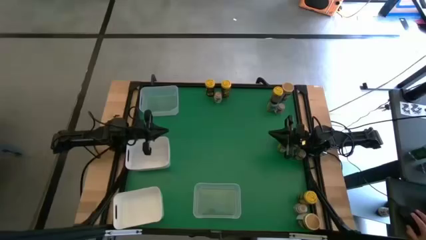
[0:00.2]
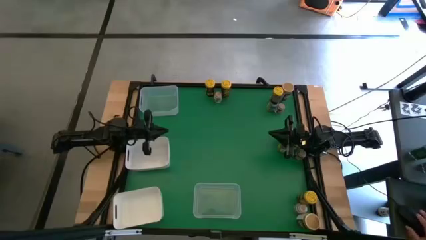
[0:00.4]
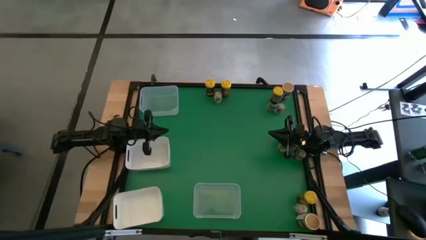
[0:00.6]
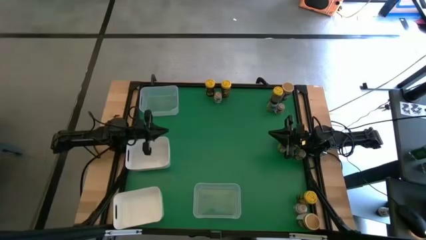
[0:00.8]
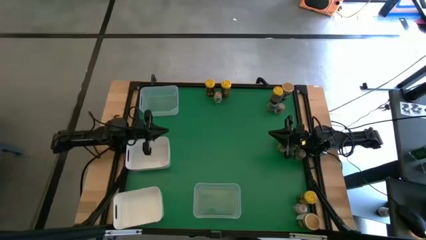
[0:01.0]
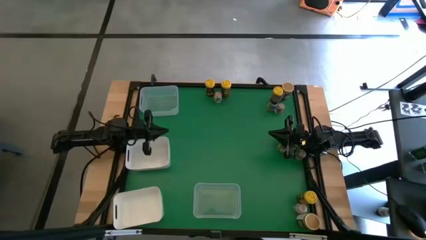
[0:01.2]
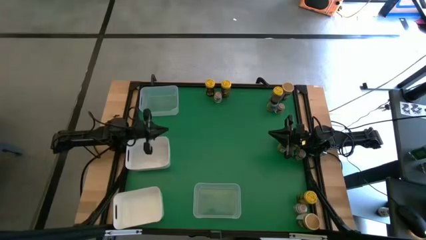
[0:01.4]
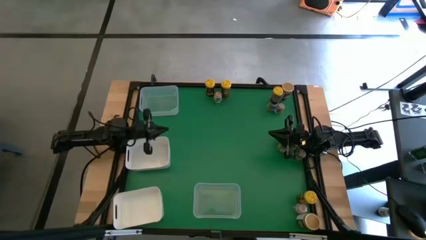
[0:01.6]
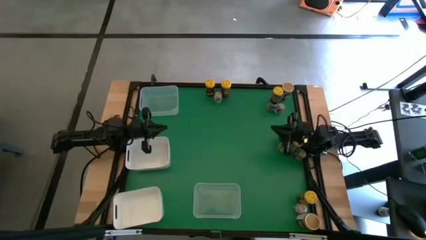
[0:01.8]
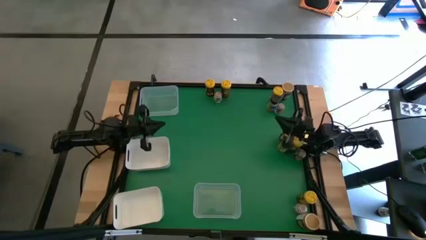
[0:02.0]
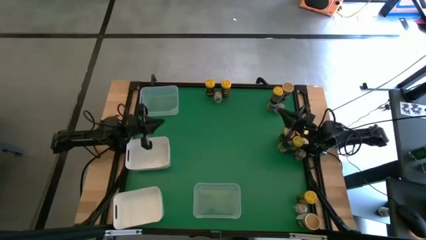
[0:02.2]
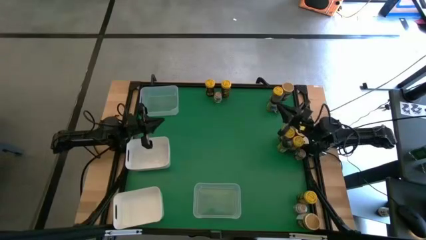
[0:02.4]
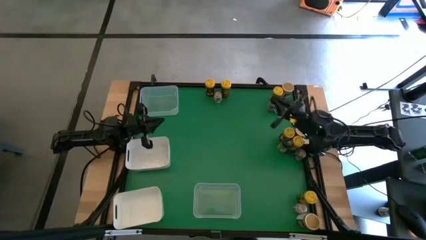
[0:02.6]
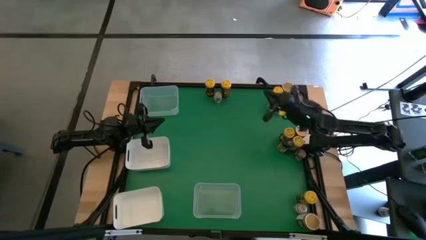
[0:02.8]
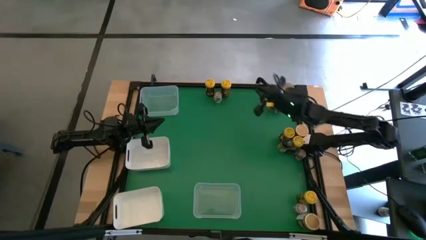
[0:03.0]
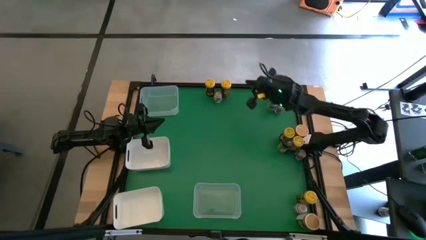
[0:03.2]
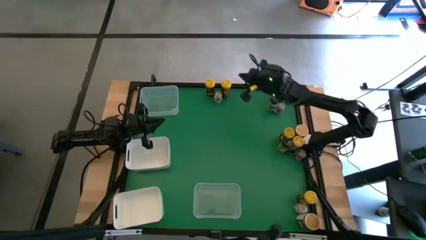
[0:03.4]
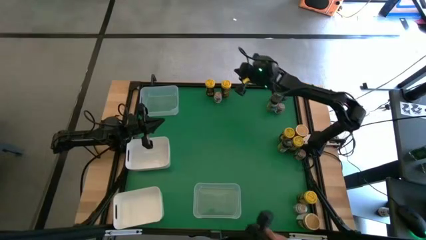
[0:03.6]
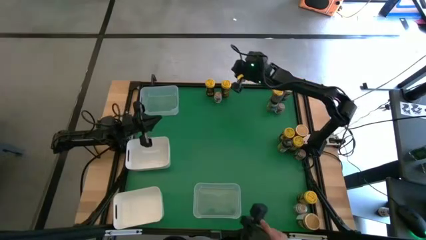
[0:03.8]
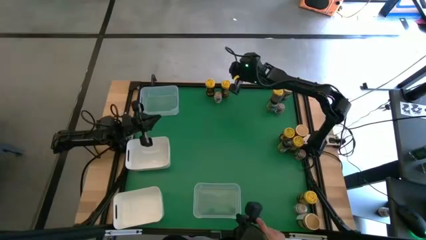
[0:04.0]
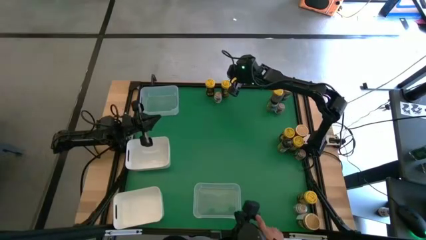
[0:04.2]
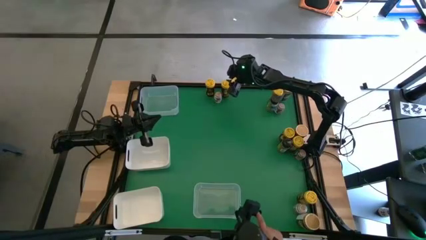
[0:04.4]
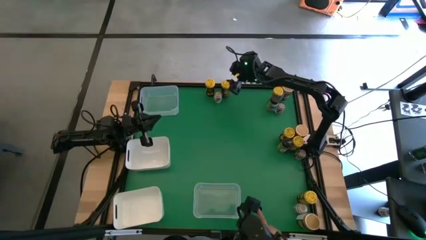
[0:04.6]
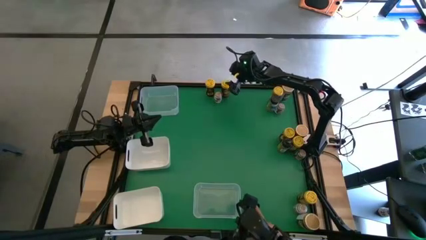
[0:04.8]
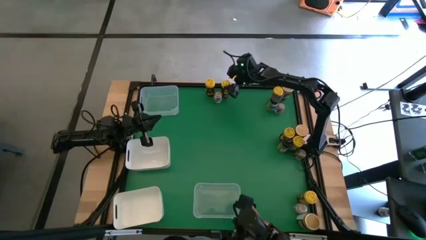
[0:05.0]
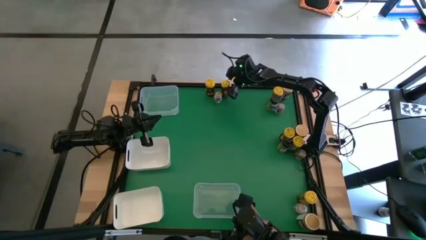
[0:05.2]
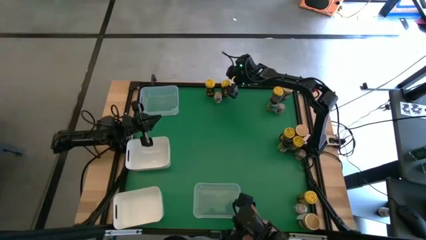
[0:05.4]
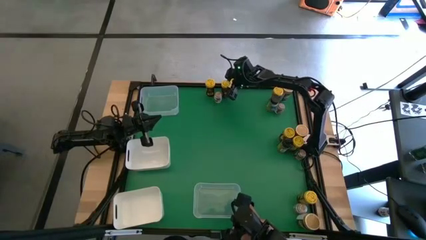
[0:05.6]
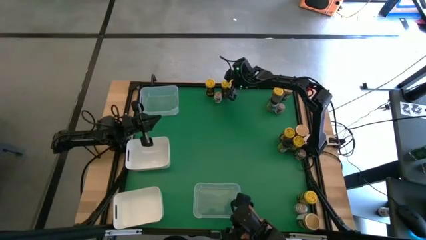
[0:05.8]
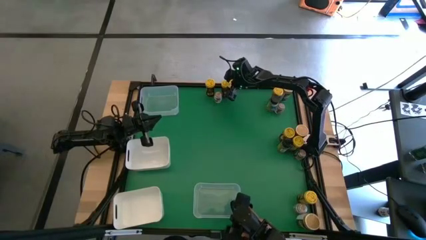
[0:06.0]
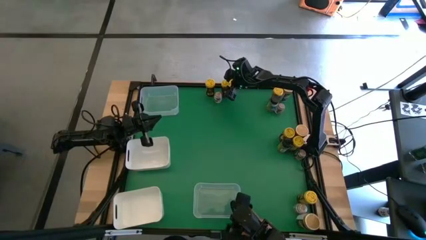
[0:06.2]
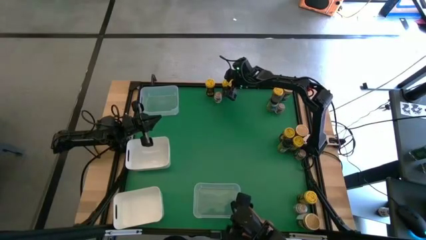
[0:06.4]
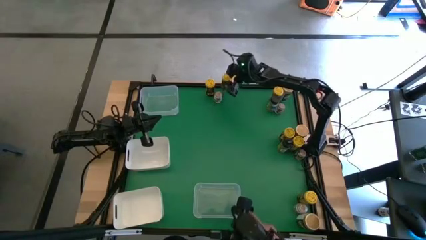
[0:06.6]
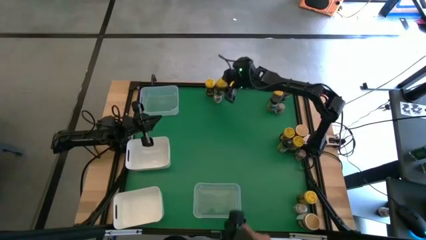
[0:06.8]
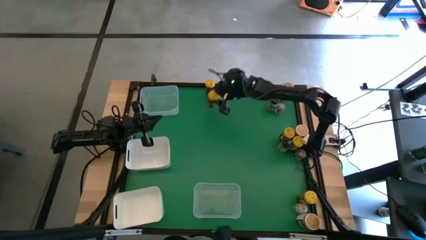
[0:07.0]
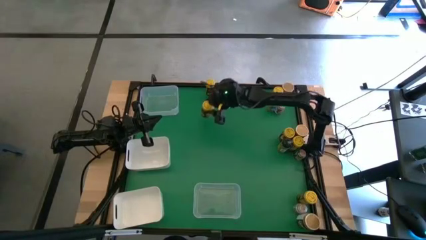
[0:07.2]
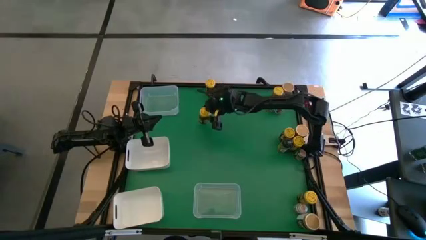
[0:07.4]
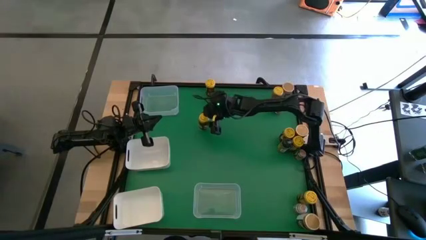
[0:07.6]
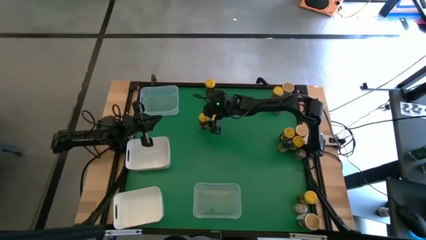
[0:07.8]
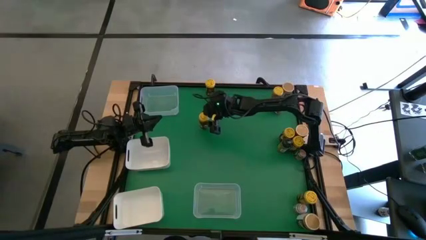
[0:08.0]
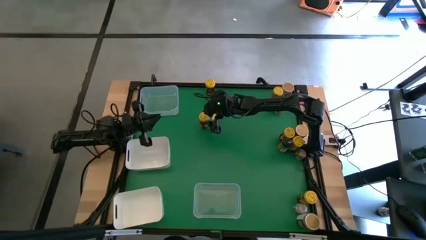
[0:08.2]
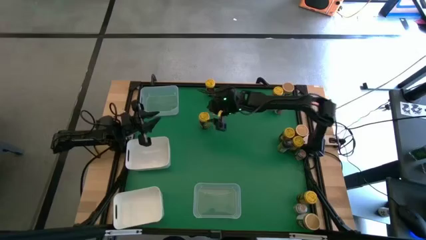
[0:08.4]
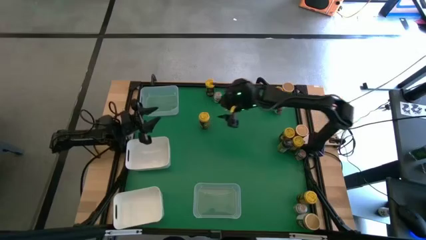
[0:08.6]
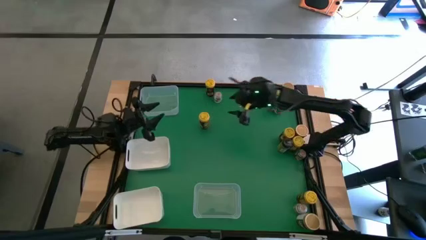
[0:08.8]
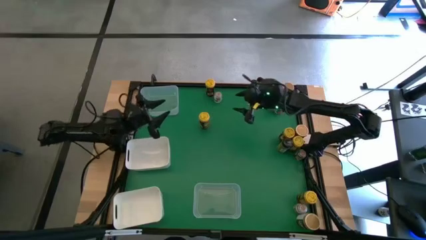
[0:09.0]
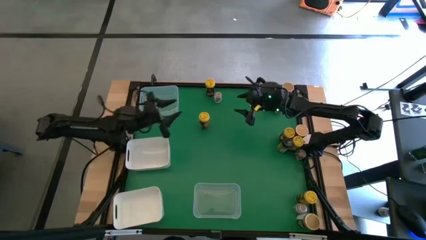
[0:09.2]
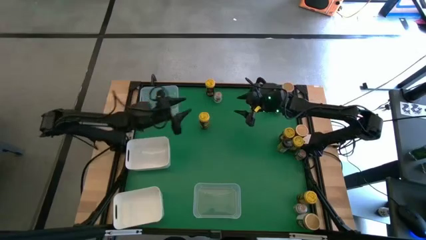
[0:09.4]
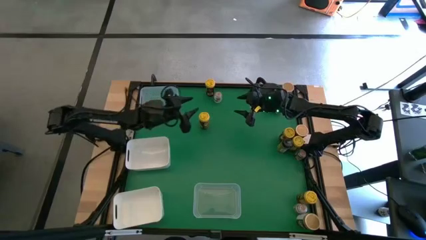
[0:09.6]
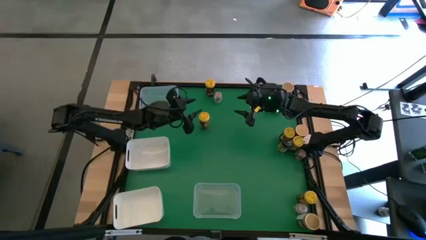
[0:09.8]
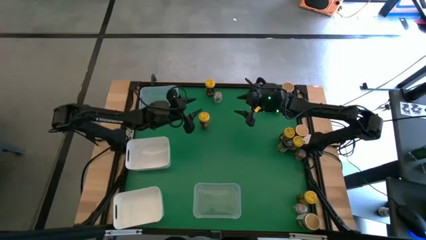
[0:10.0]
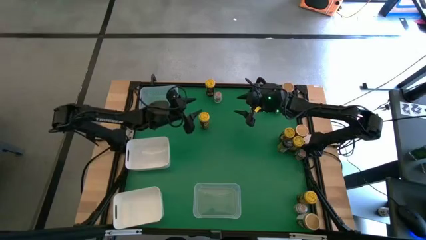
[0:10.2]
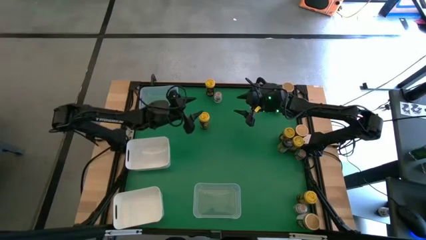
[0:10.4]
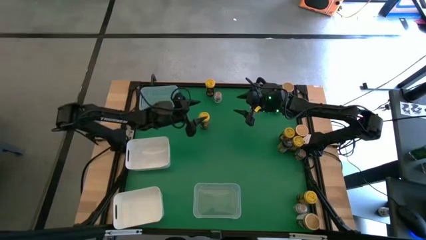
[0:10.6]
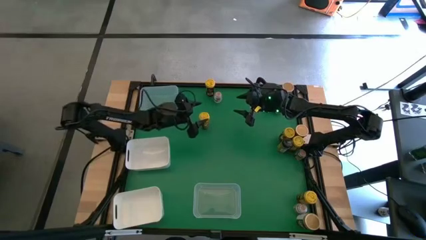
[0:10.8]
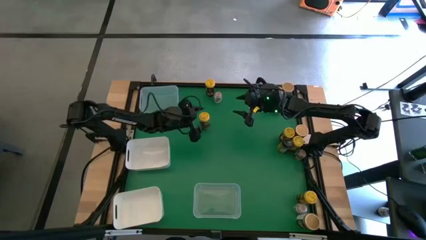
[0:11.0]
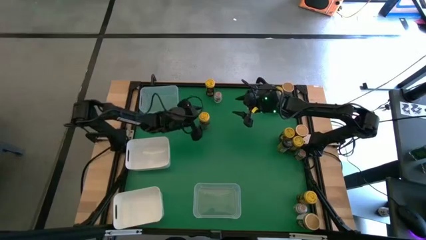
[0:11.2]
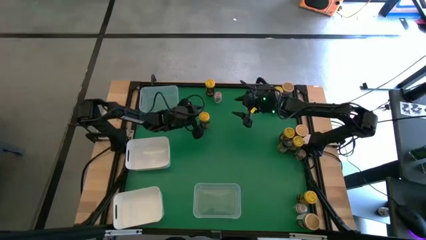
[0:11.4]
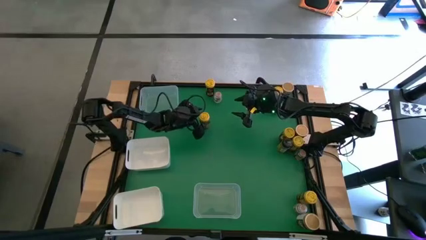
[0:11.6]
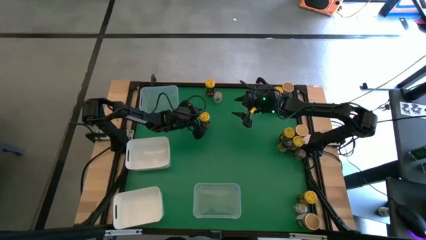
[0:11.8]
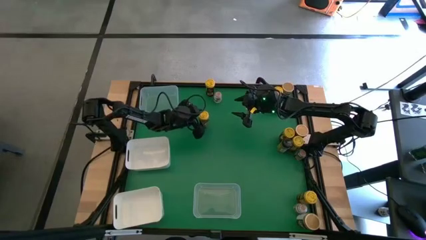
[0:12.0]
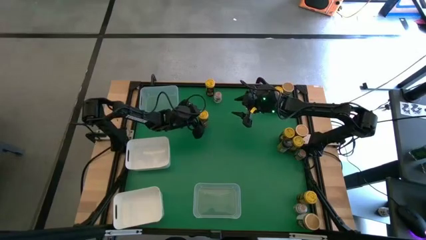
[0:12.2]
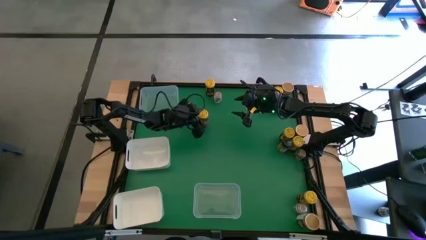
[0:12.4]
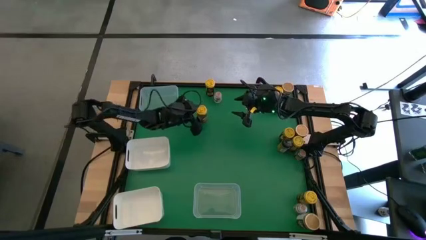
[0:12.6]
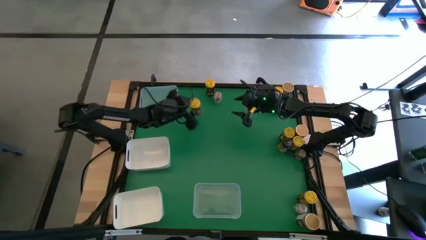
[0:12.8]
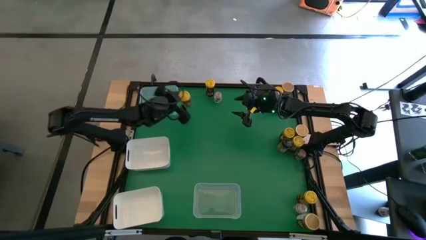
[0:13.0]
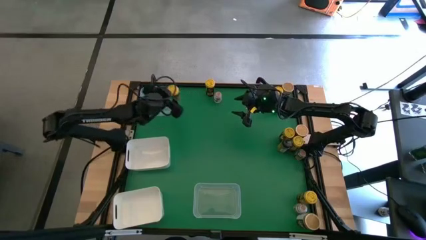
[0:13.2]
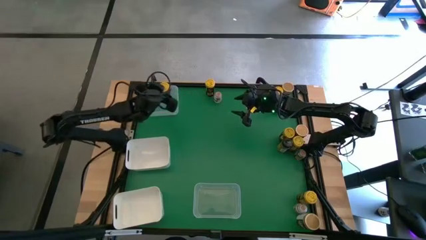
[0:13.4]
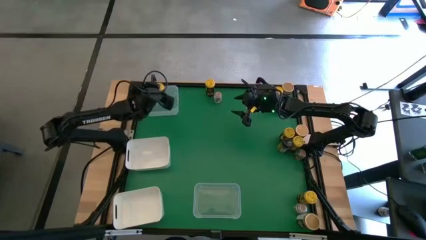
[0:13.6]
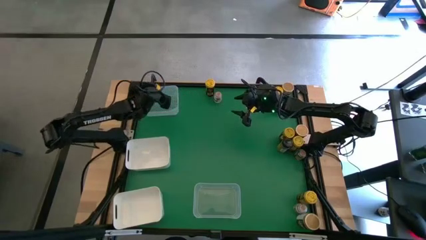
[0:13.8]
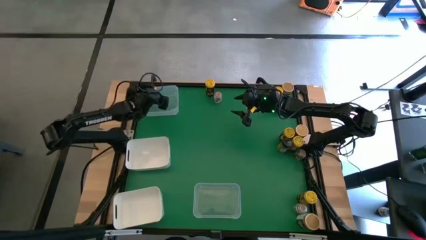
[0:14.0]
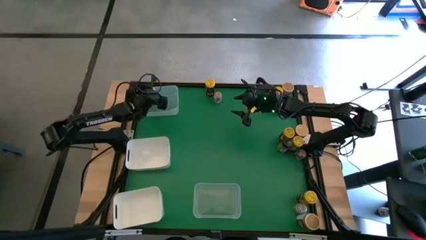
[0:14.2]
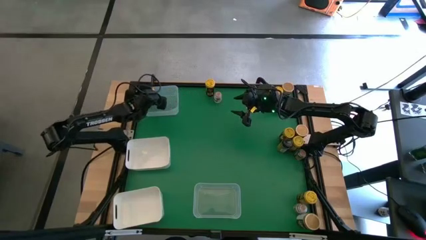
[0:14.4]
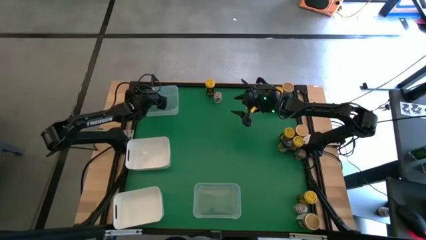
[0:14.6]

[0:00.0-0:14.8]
Task: Sort spices by type
Put the yellow spice bottle into the top transparent bin
